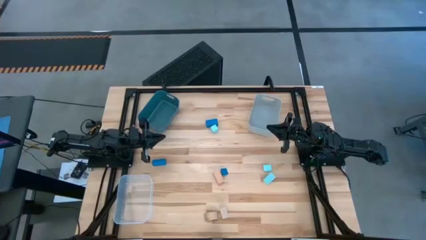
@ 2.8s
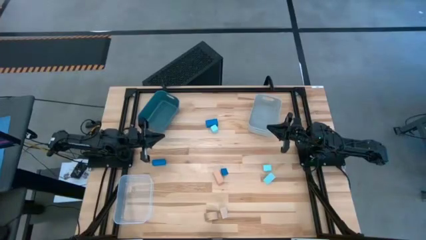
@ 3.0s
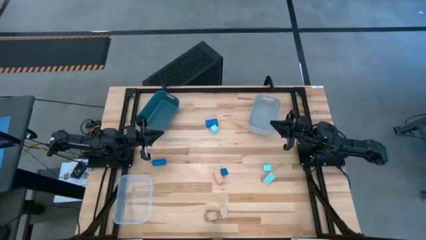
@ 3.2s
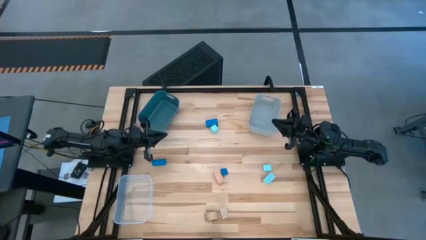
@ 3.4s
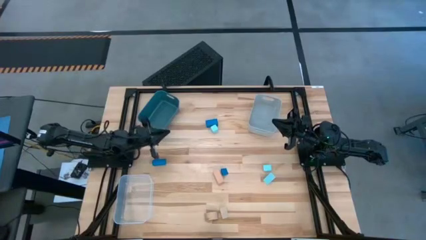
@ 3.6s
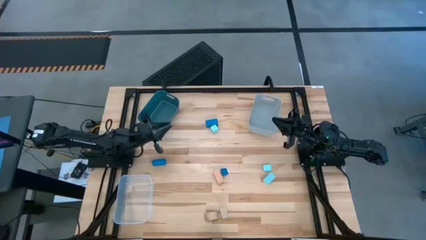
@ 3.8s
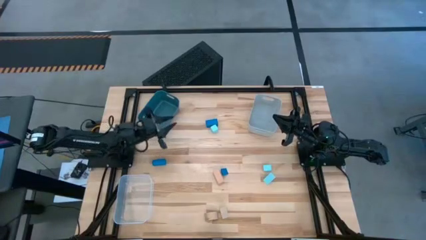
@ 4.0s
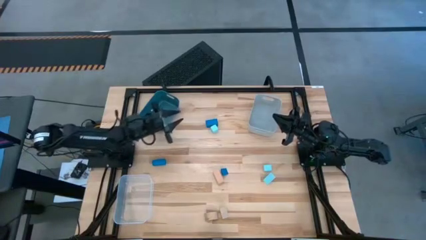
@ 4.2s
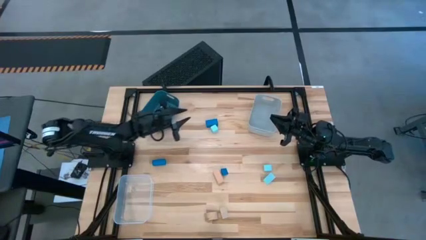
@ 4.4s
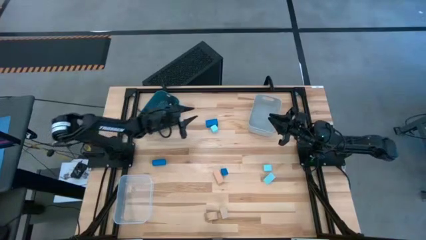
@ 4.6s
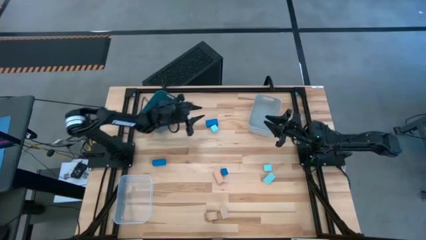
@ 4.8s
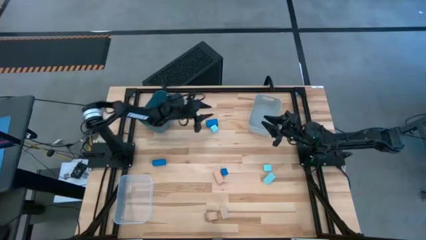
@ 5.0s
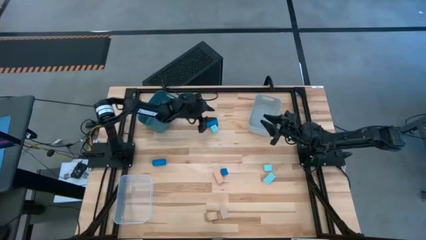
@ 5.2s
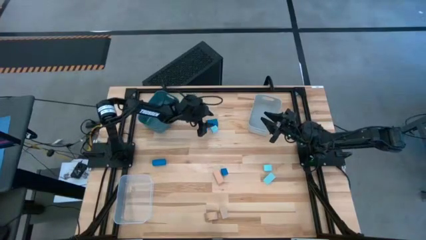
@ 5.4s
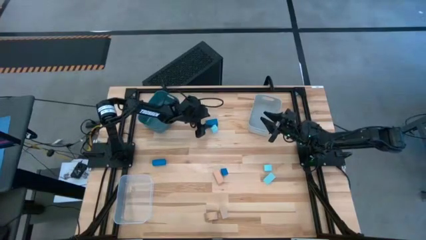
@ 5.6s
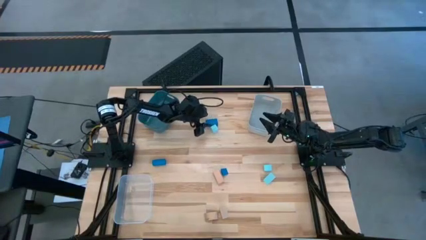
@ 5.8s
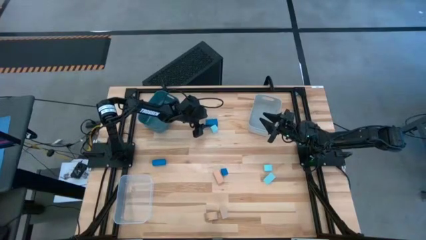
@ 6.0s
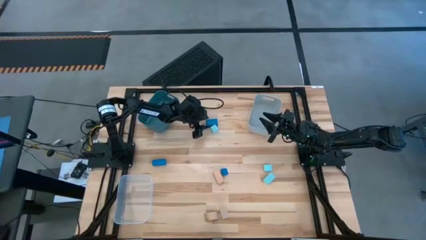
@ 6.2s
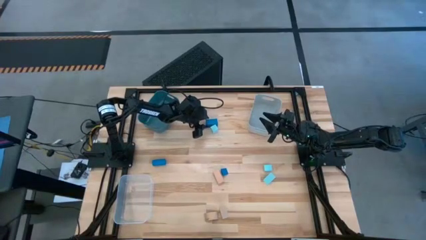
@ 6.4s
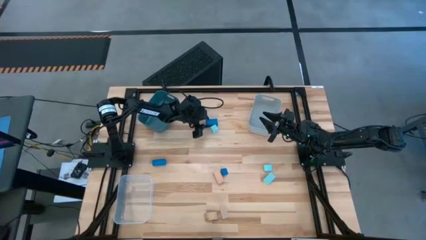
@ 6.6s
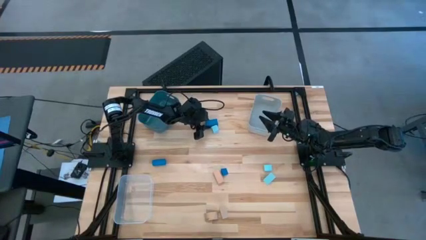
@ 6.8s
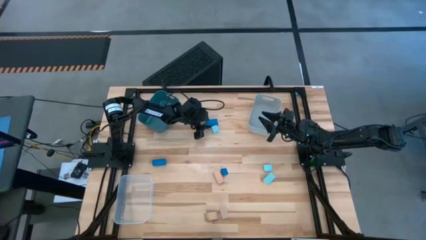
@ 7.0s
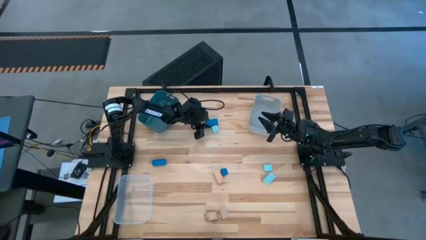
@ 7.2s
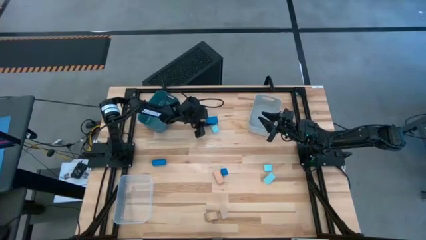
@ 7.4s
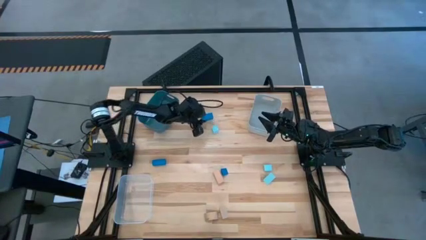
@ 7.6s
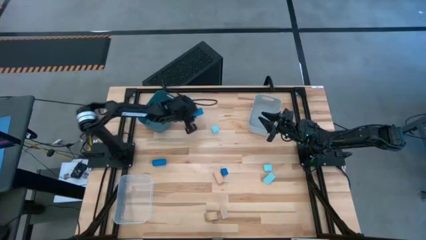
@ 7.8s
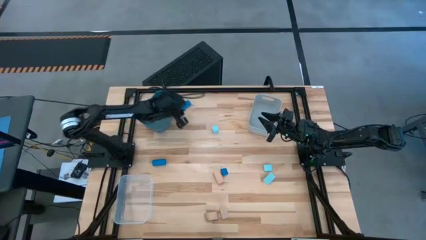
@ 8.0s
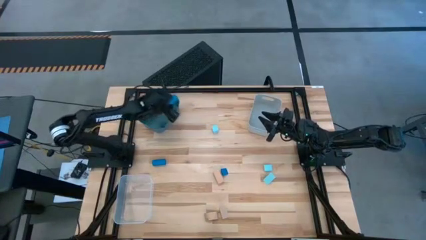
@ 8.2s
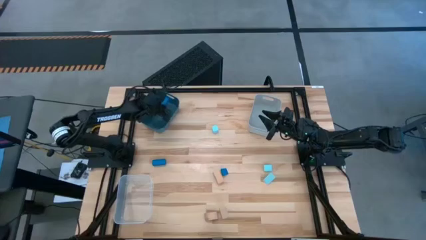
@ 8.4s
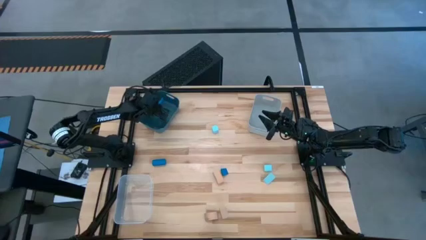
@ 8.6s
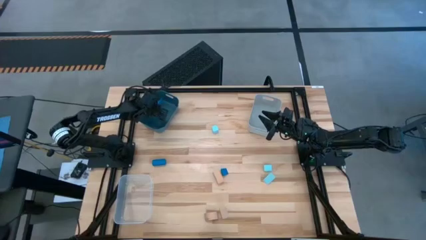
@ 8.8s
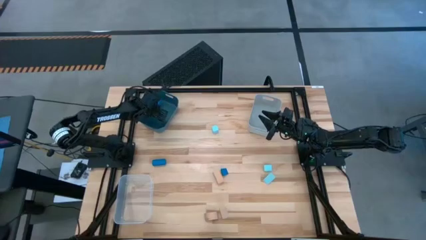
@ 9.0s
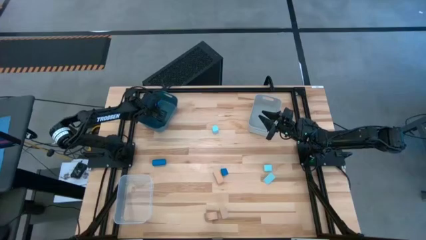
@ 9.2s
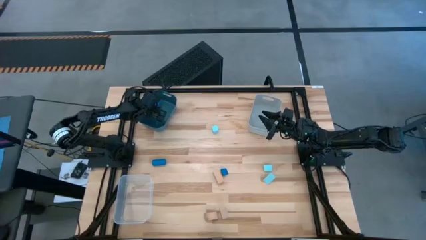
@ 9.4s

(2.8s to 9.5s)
Task: Sort & place blocks by color
Put the top right blue block into the blue bin

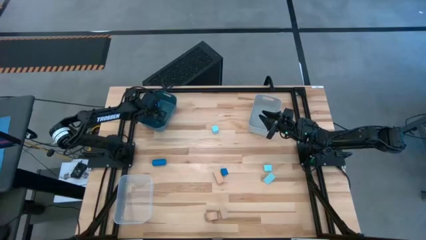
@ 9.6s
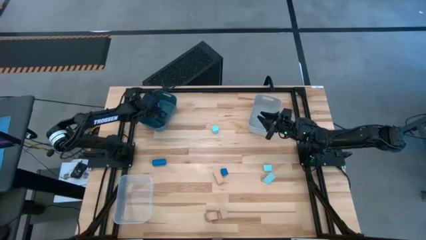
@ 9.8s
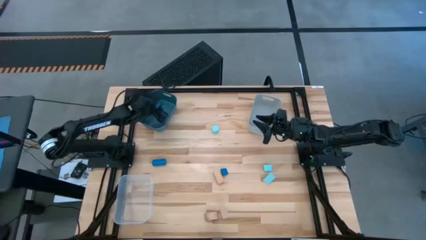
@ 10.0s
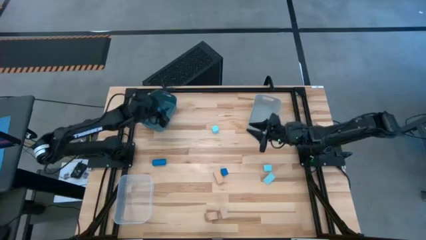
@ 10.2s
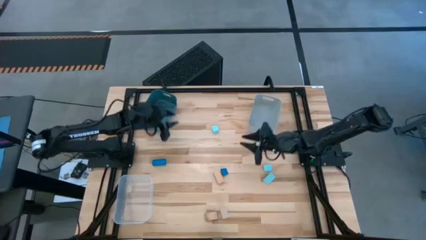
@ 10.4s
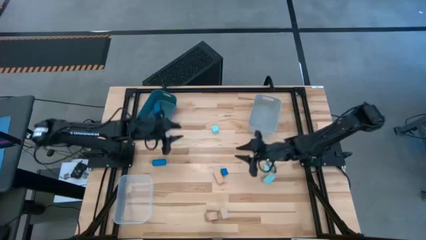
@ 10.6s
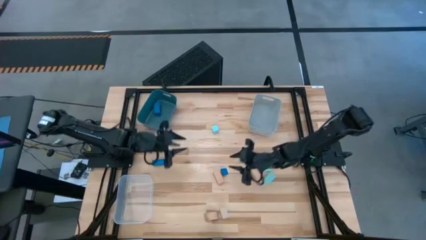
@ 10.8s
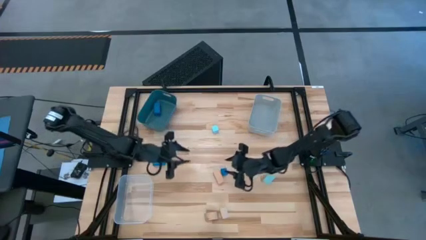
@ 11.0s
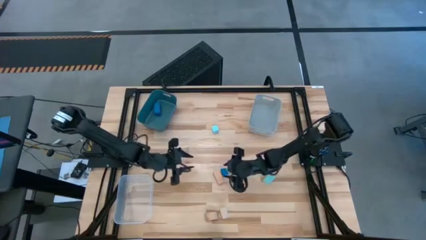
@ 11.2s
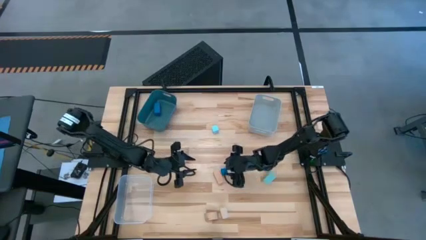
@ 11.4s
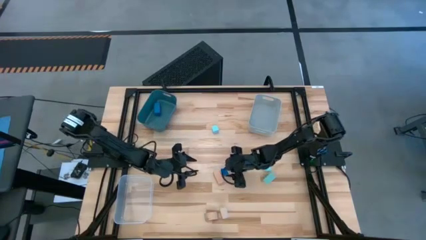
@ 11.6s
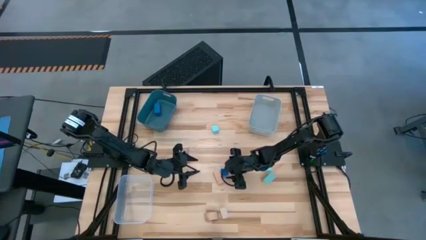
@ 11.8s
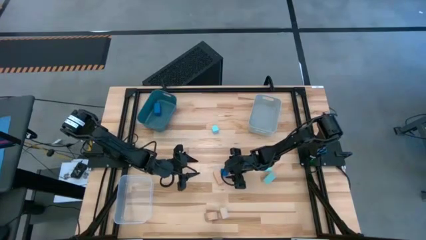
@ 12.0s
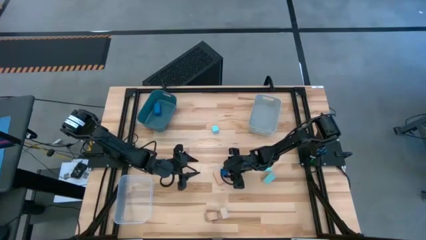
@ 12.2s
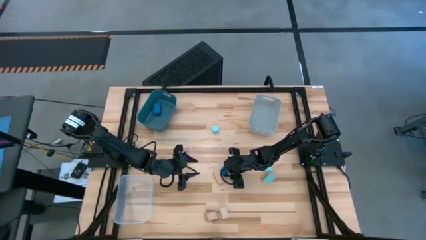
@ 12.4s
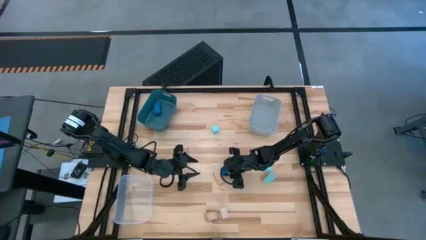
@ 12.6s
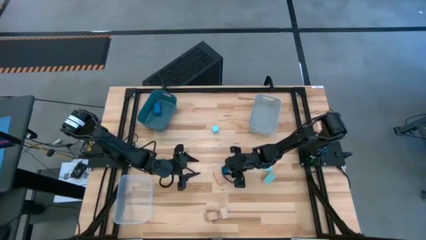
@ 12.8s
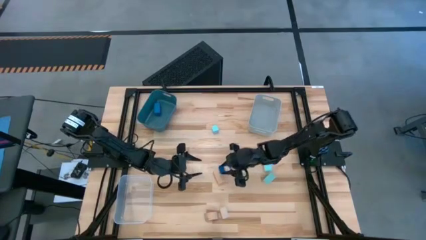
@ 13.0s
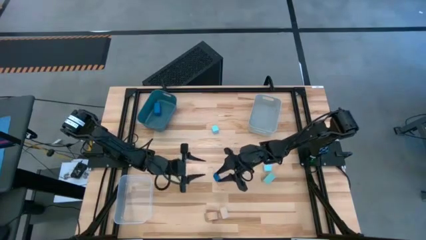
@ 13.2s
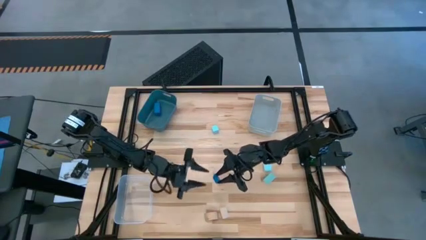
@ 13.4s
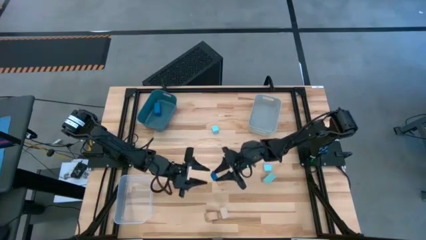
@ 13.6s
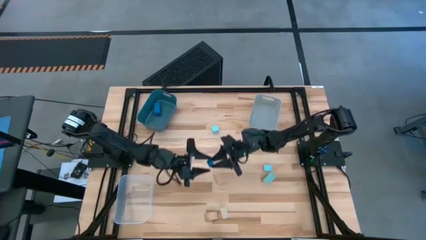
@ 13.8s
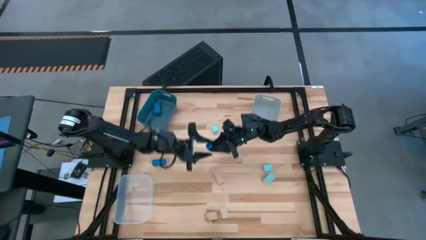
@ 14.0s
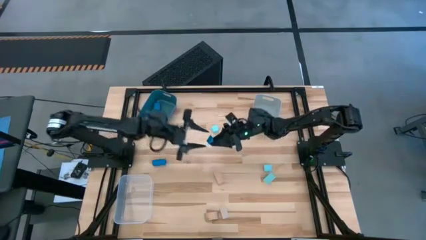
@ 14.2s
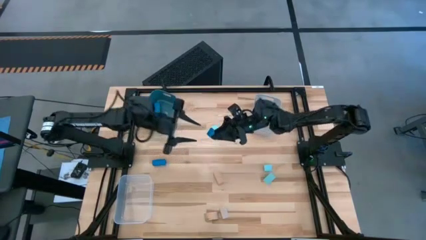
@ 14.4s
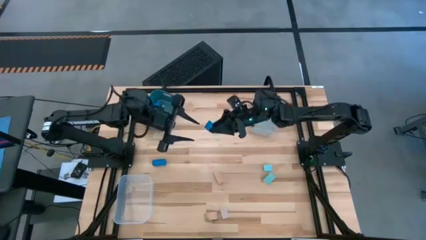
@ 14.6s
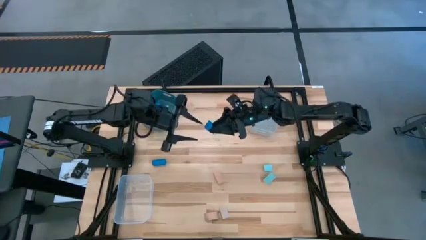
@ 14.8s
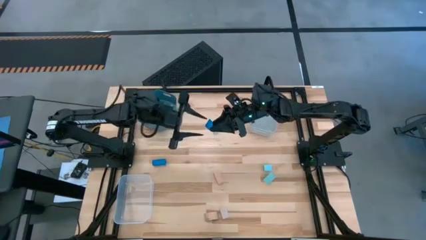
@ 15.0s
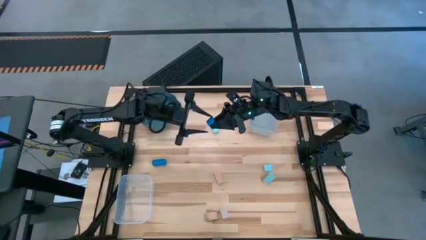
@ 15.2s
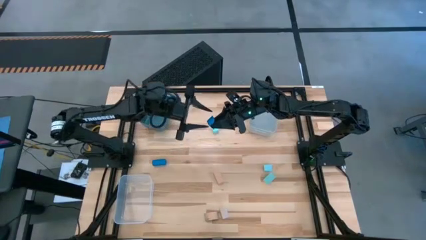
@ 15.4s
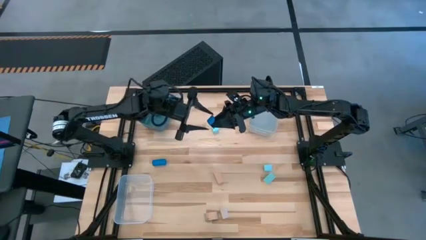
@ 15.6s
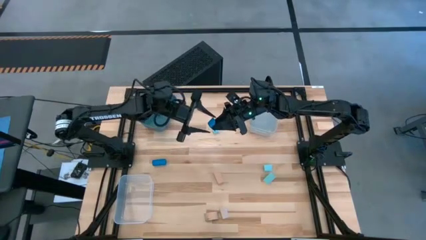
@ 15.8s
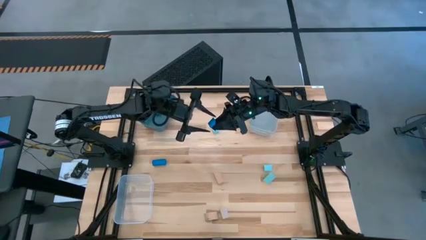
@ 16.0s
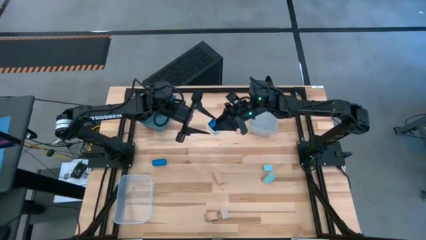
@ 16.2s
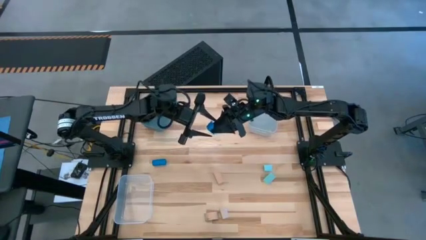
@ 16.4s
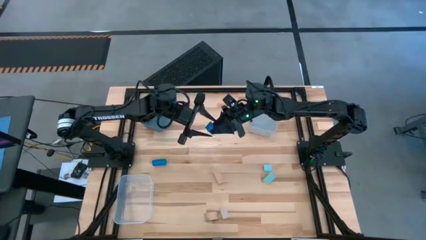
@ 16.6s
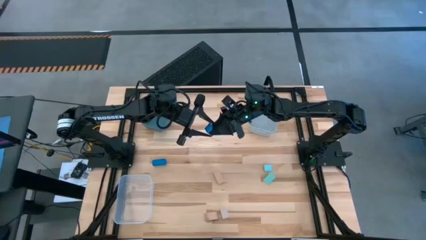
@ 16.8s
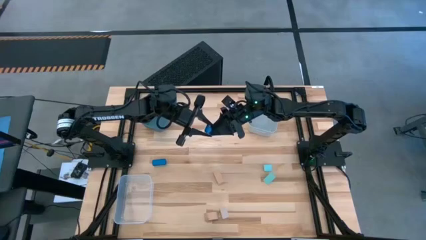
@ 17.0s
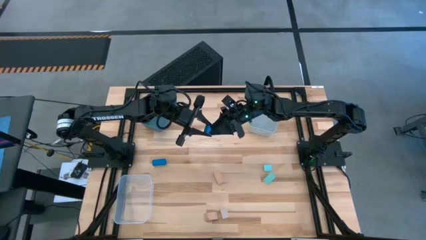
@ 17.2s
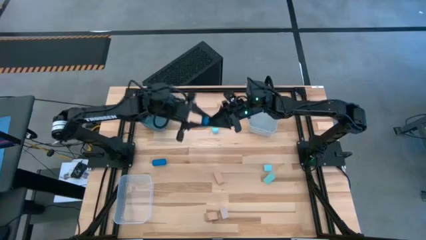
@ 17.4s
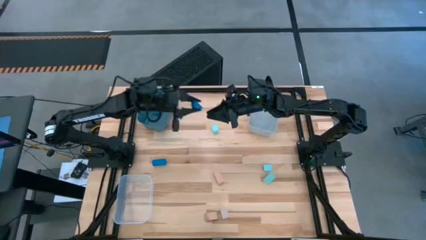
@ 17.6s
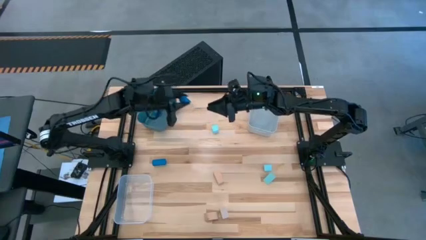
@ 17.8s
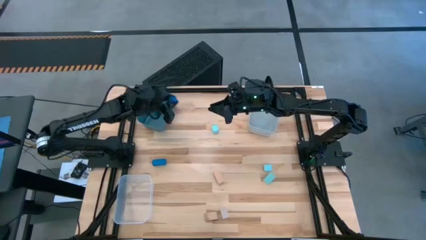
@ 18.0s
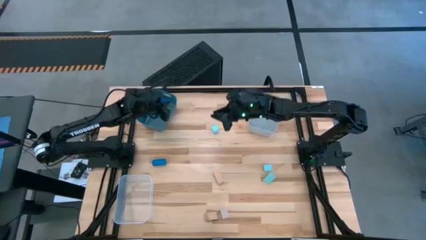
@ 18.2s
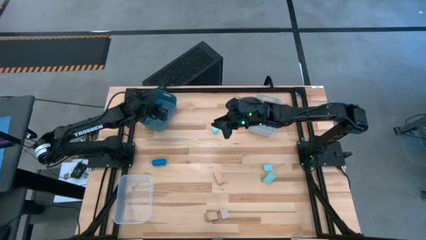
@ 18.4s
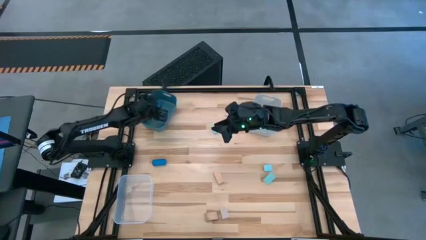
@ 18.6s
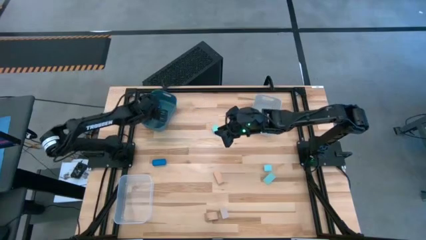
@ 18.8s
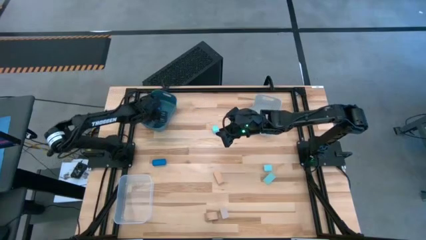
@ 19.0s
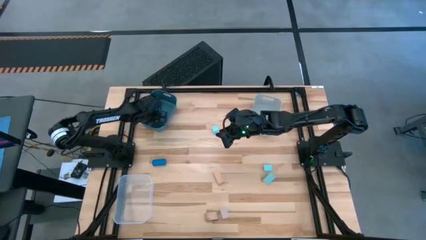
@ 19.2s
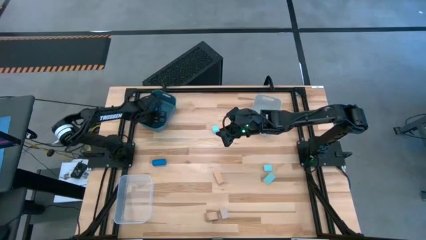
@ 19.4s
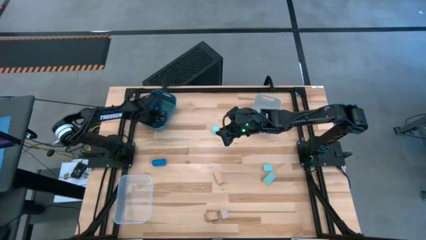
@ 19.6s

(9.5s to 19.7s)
Put the right blue block into the blue bin
